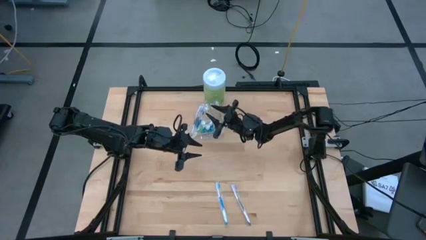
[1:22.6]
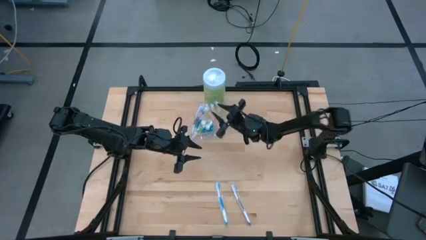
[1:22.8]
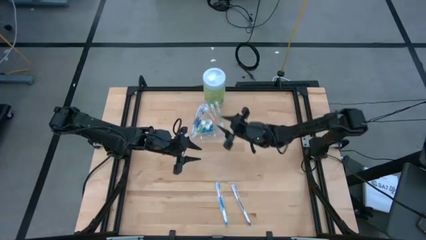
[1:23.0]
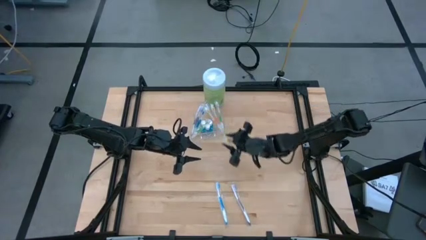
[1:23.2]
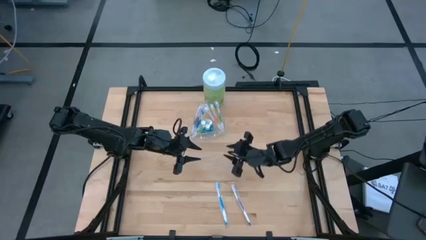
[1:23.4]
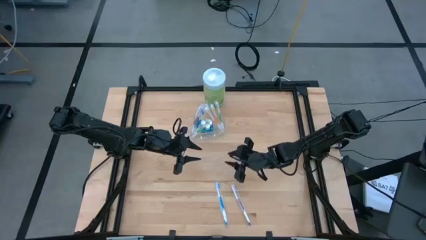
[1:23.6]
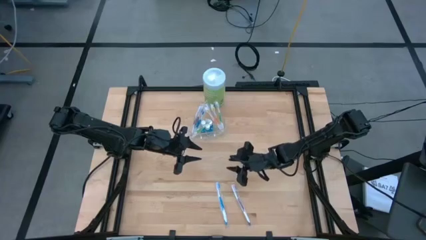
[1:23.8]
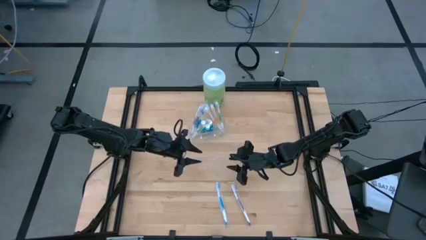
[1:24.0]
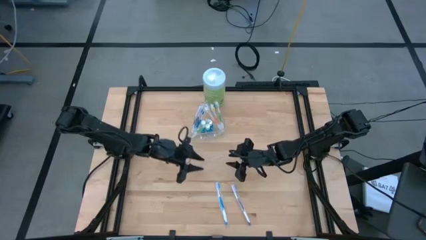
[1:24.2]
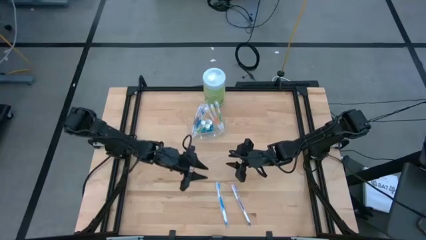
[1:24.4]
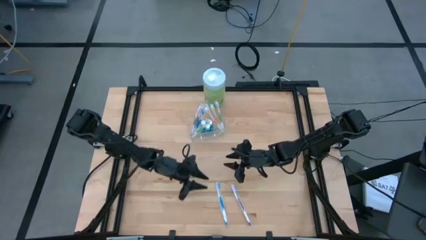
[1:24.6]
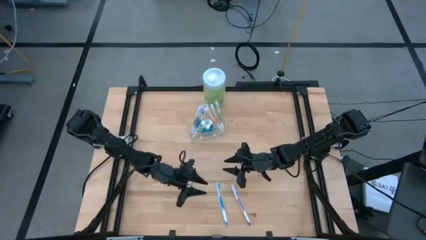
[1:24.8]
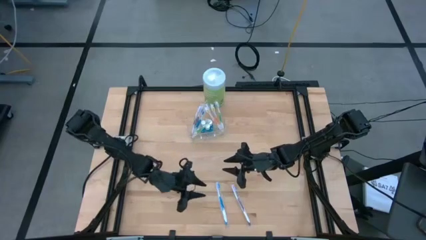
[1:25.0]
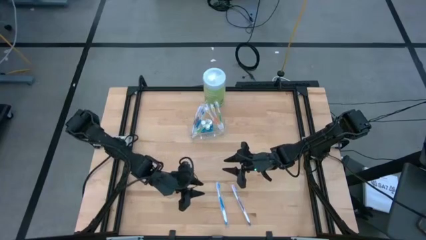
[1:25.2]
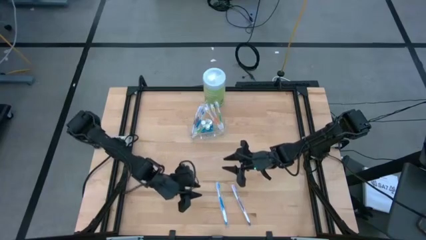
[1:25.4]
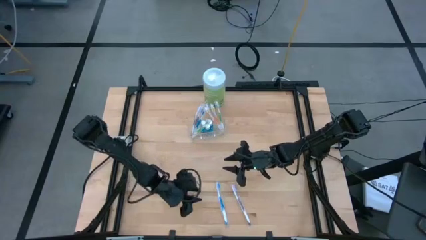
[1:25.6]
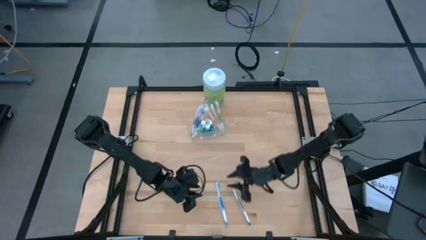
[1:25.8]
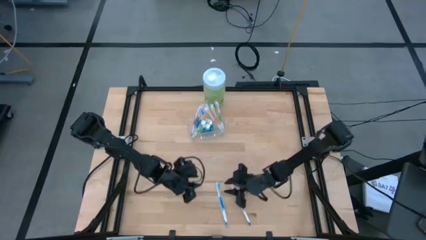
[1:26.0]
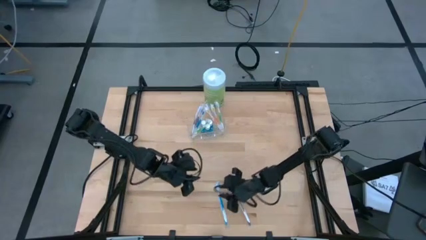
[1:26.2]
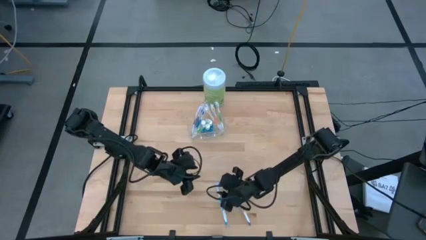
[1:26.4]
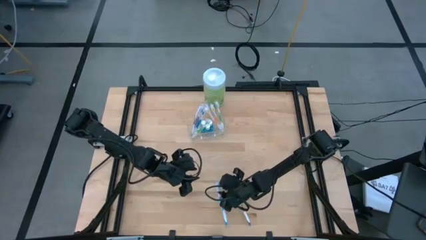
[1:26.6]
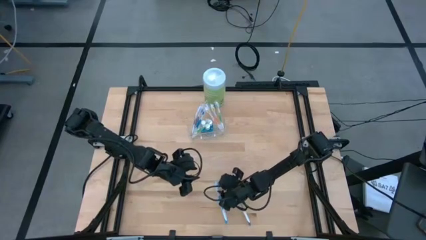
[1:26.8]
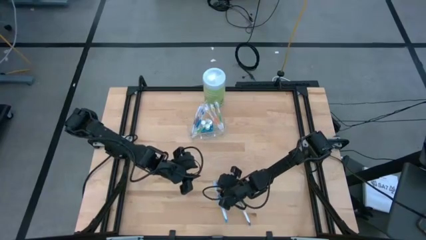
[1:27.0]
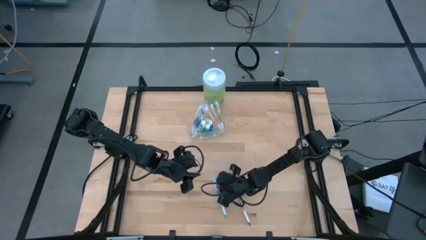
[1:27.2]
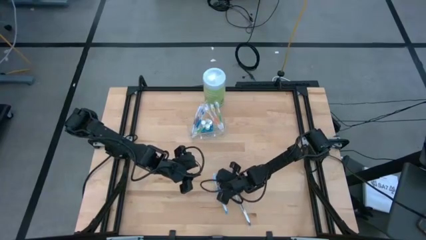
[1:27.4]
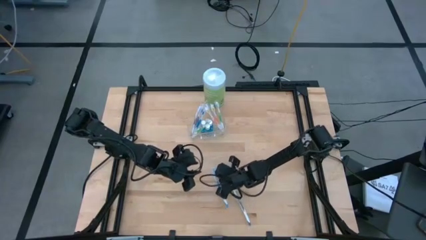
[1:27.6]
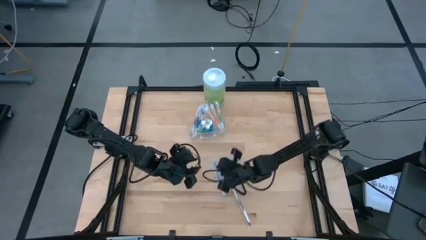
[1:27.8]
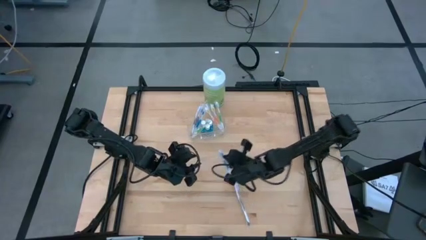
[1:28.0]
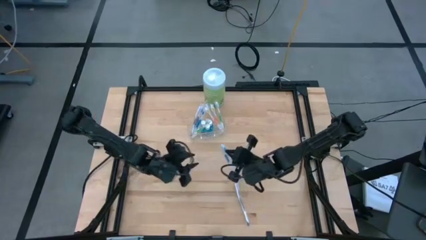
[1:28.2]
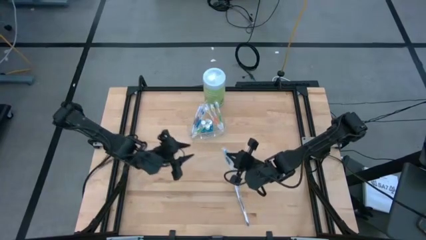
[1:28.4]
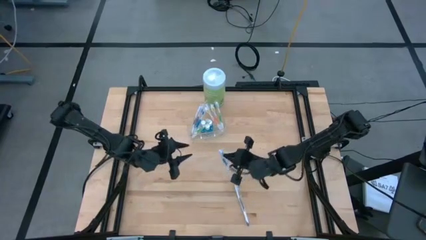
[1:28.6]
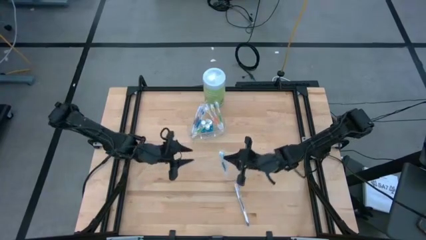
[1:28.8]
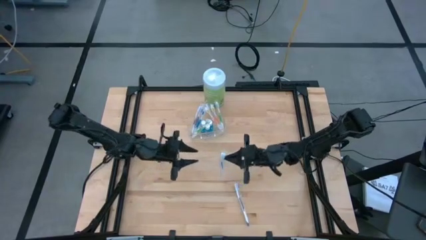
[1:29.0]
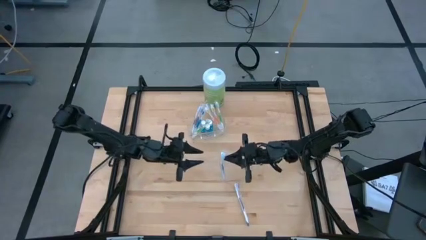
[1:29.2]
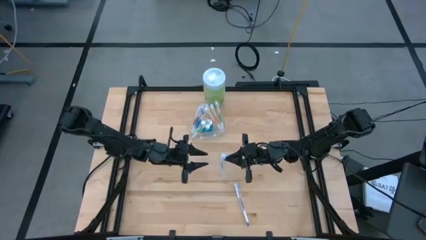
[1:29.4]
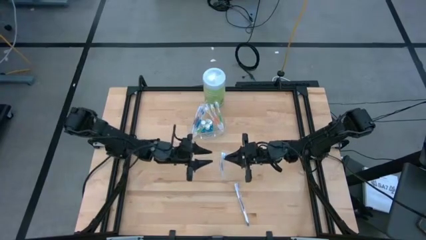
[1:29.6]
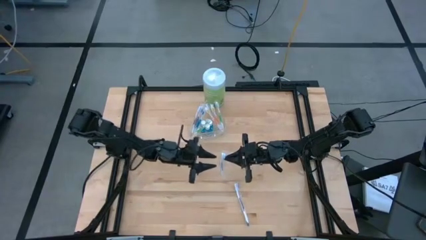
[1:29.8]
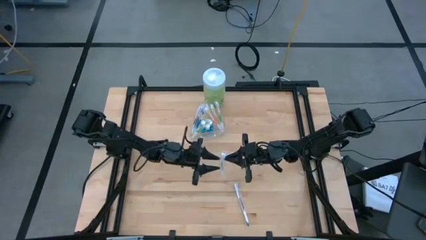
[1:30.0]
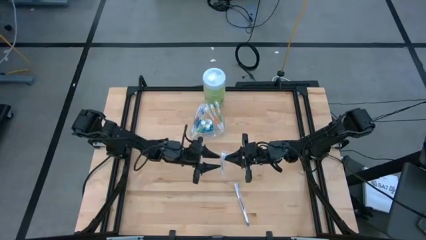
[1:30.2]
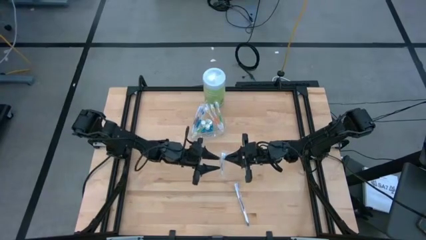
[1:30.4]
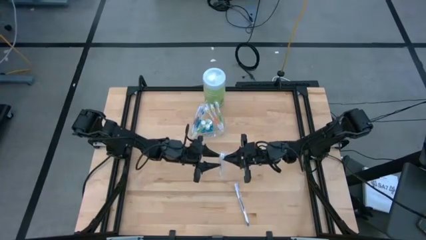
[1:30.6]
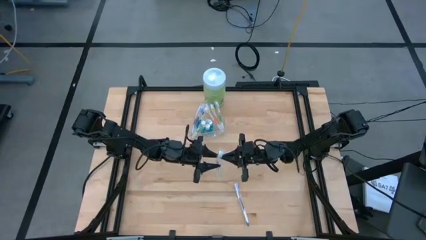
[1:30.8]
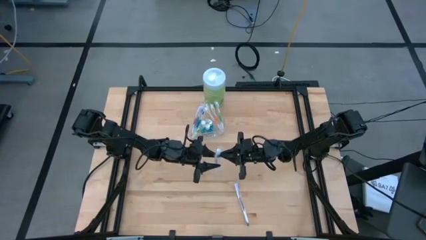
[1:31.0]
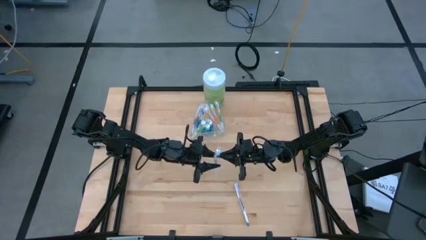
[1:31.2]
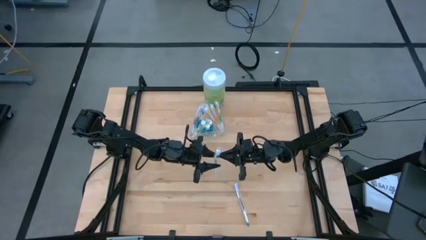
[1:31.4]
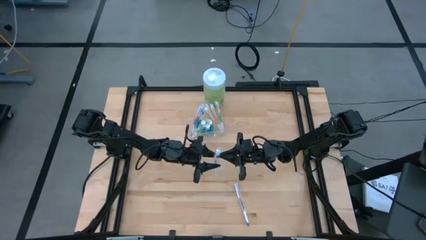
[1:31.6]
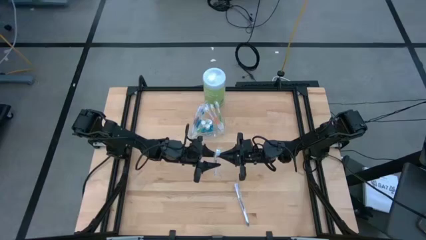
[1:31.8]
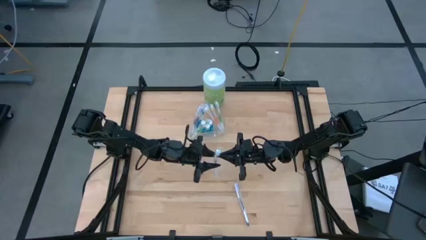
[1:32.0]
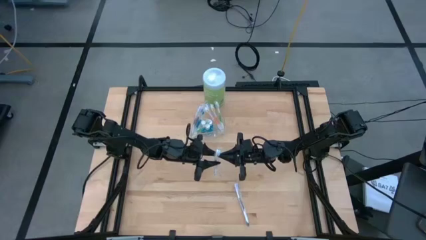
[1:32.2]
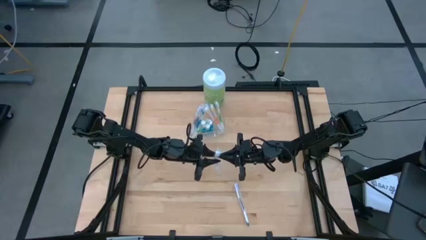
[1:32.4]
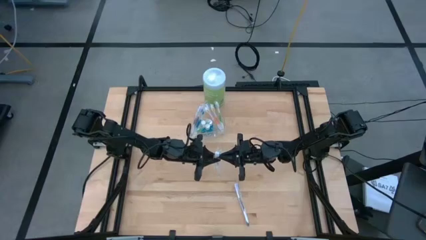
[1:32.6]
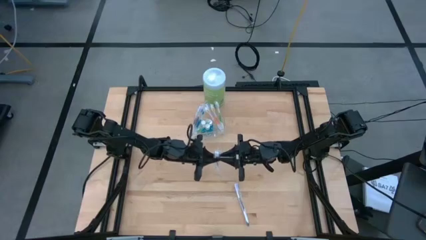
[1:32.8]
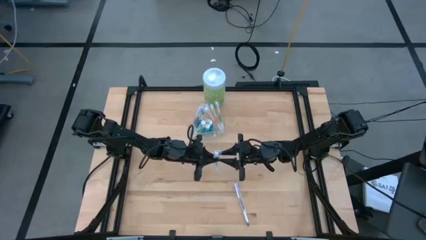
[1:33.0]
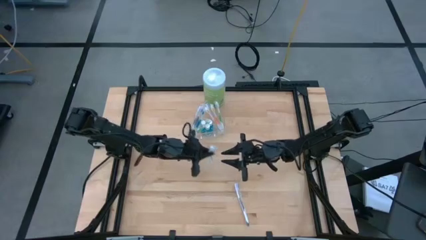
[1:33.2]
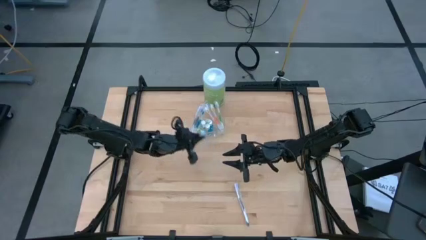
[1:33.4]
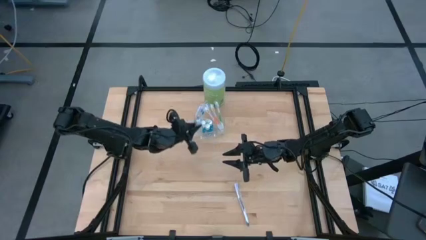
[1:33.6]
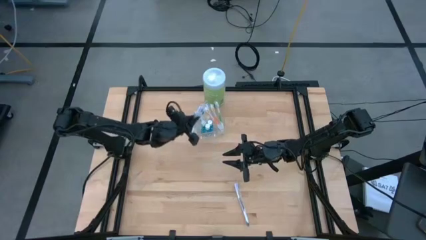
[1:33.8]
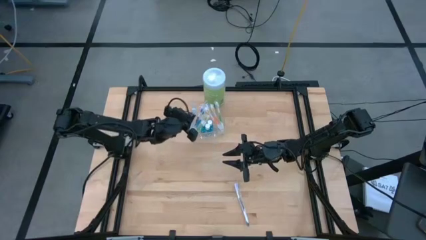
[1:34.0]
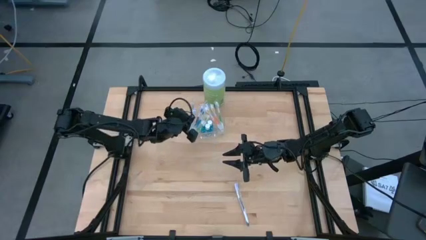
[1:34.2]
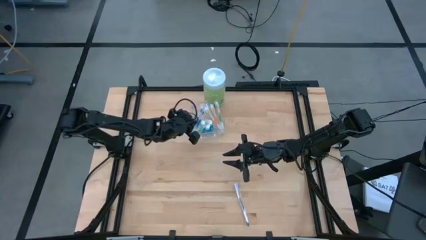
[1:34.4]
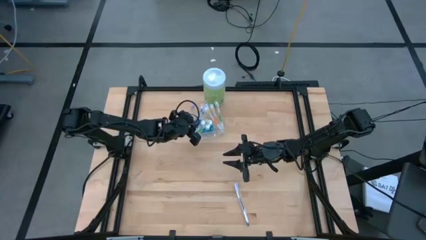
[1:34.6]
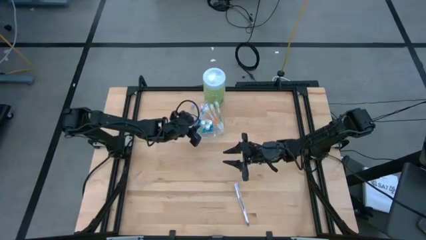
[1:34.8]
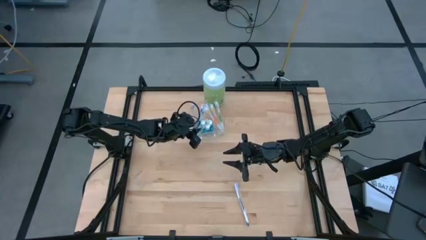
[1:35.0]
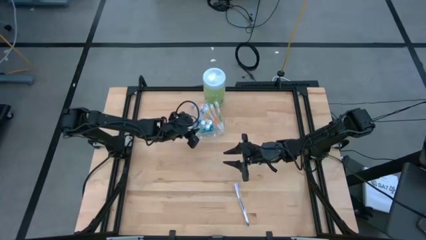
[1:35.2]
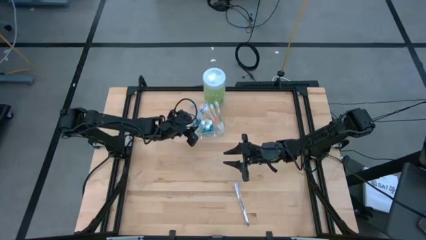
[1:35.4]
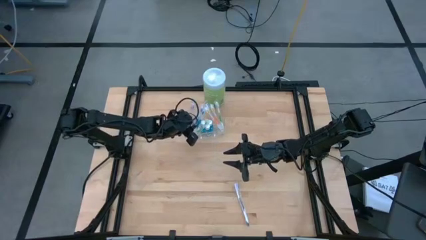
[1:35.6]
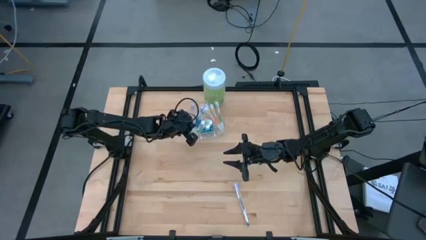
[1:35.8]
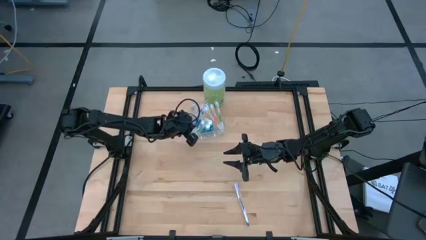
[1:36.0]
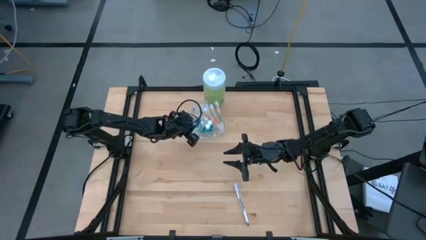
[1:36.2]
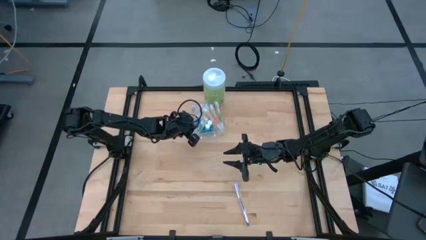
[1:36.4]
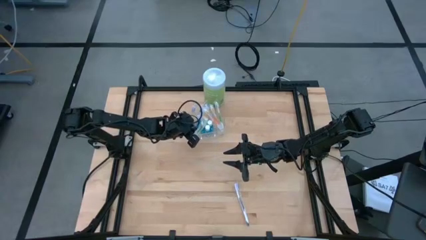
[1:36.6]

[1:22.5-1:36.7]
Task: Pick & Place toothbrushing station
Put the blue toothbrush into the transparent organizer

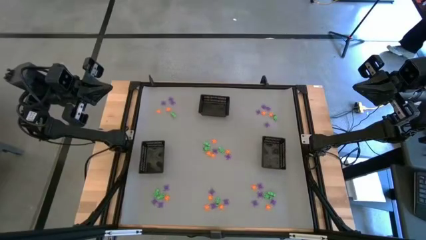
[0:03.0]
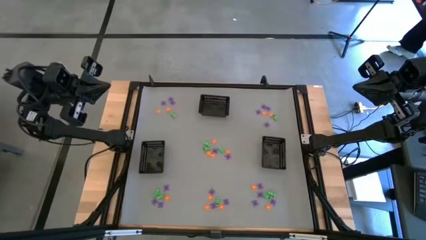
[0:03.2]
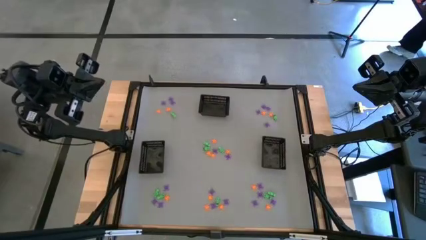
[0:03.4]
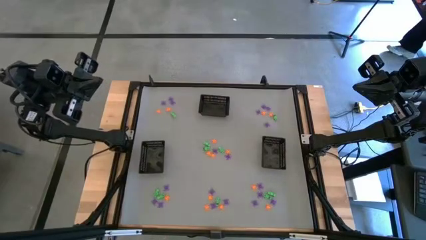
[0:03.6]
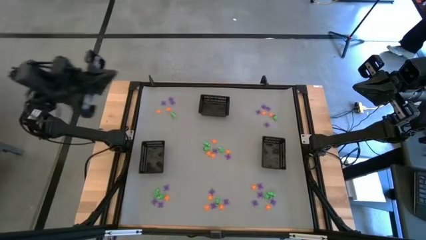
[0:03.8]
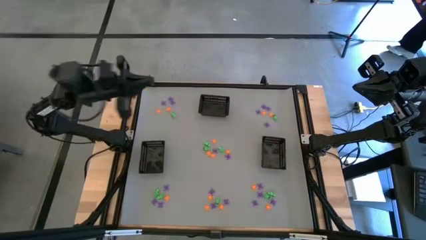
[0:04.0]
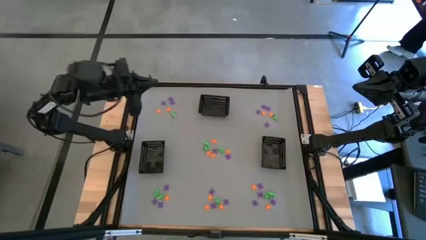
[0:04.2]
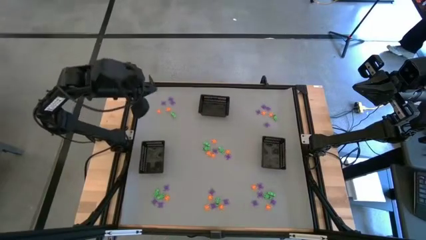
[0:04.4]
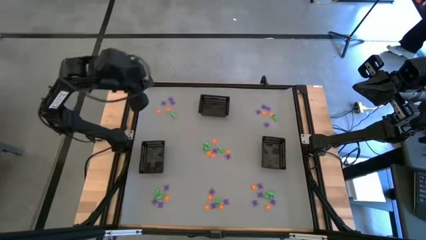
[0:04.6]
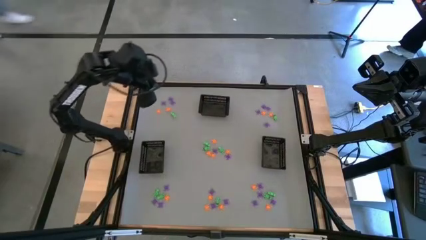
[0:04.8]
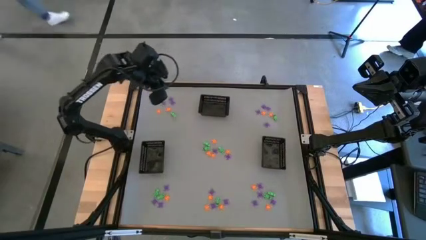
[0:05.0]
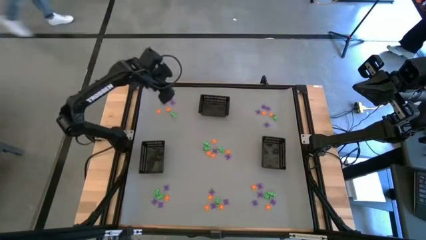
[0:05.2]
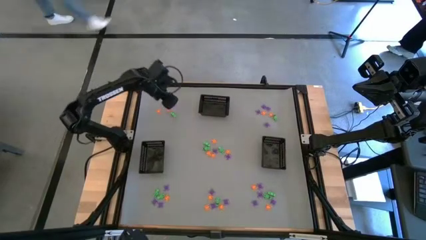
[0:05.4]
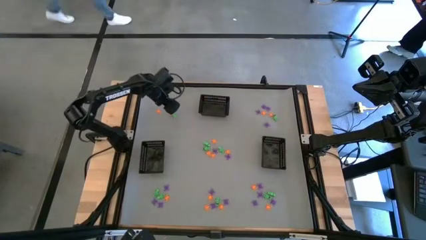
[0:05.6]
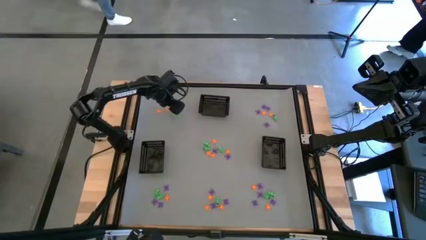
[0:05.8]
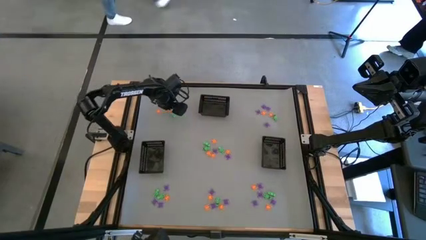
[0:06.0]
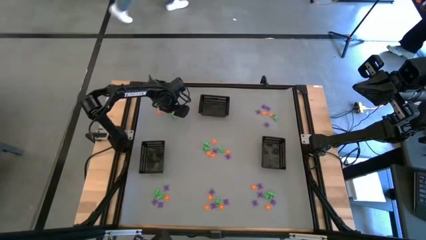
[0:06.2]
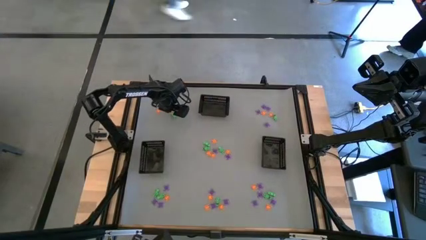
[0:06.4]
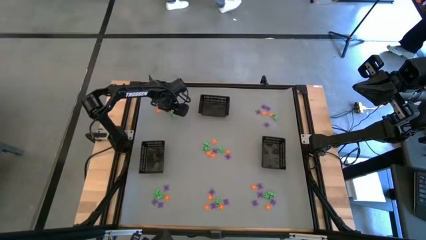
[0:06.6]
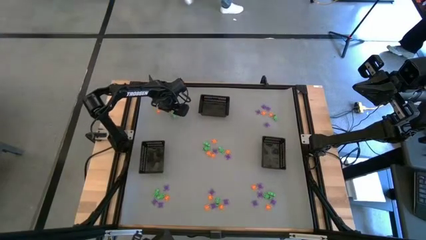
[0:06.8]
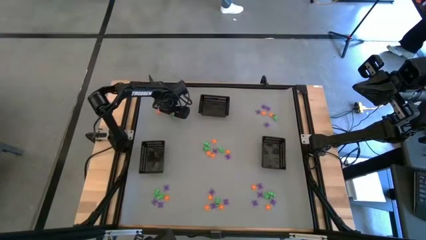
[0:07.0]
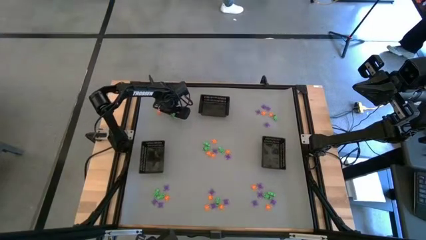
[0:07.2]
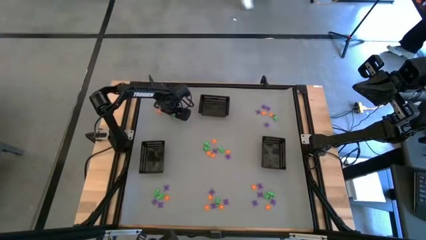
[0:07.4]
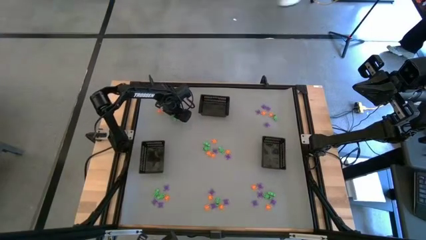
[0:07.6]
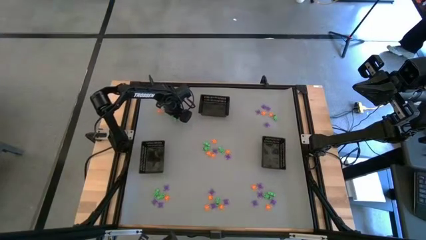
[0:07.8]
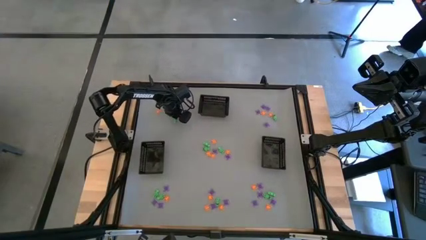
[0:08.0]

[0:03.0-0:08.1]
Task: Sort Halloween decoration
Put the green skeleton toy into the top bin
